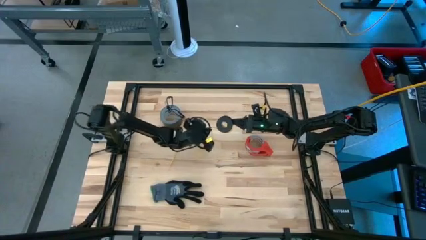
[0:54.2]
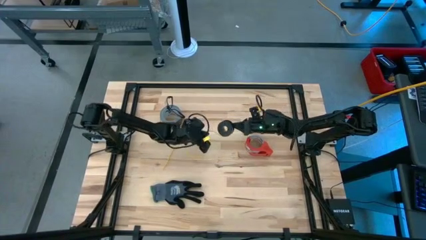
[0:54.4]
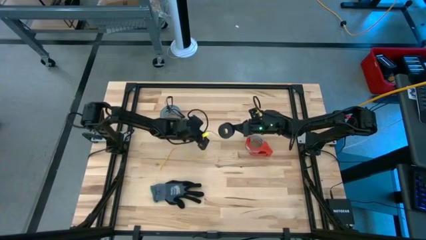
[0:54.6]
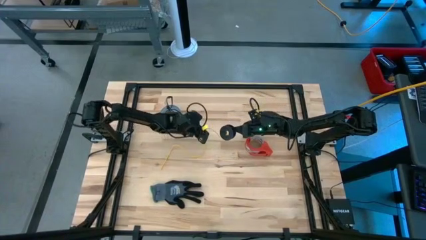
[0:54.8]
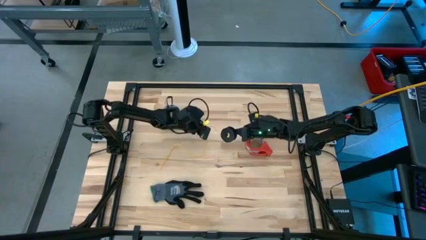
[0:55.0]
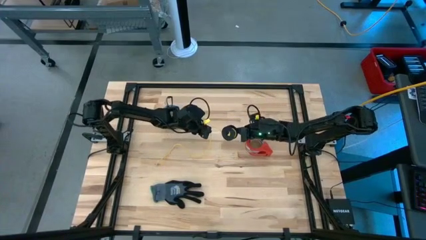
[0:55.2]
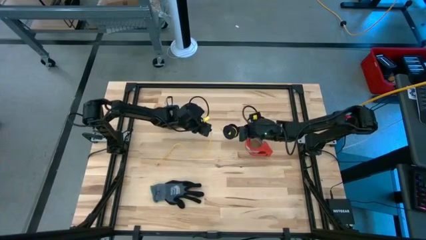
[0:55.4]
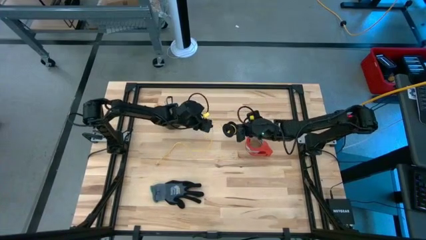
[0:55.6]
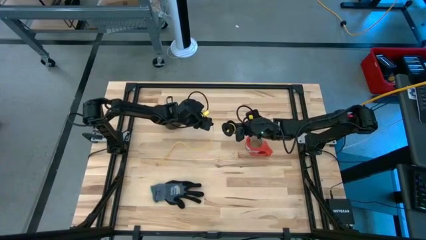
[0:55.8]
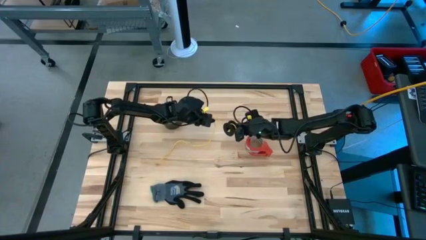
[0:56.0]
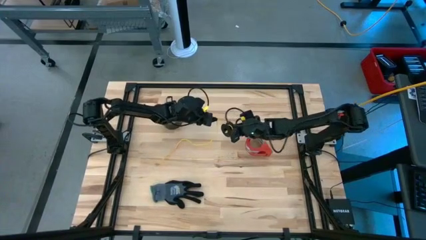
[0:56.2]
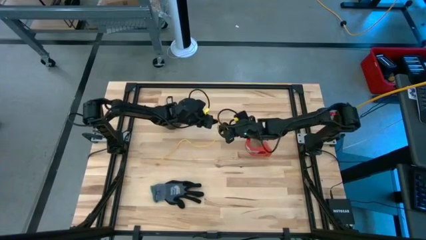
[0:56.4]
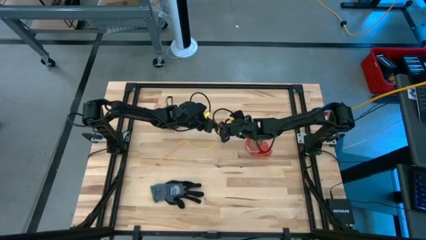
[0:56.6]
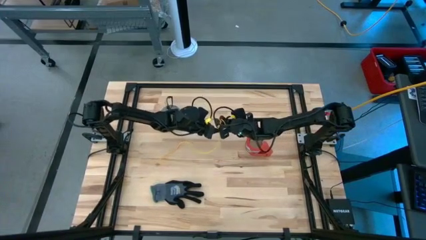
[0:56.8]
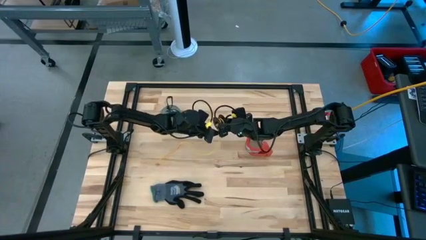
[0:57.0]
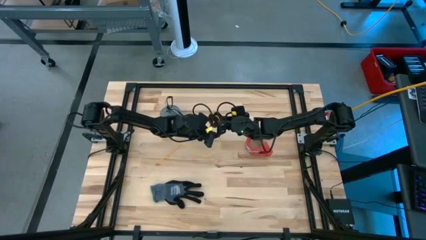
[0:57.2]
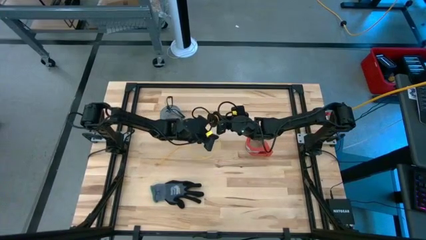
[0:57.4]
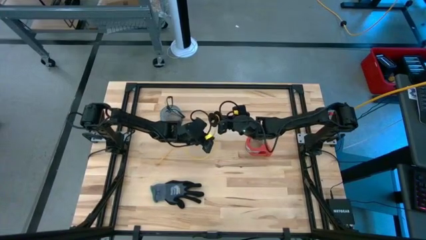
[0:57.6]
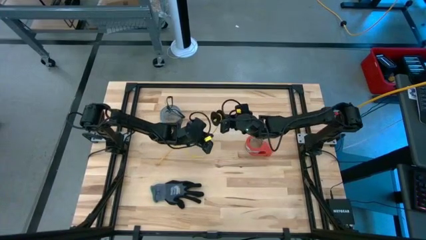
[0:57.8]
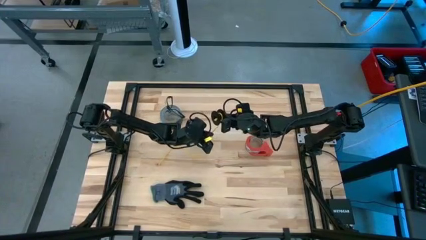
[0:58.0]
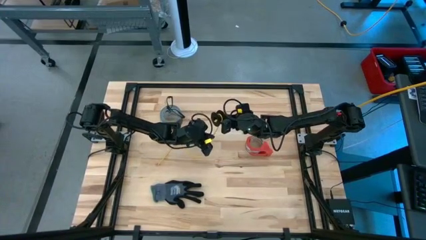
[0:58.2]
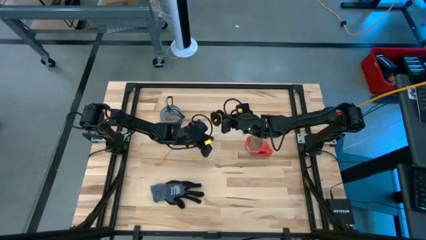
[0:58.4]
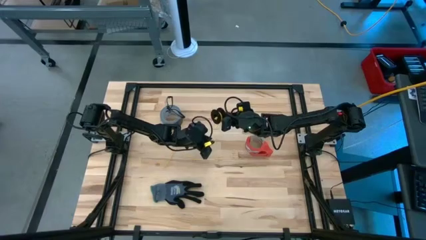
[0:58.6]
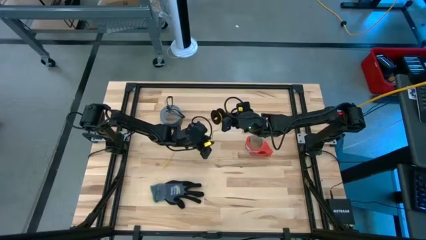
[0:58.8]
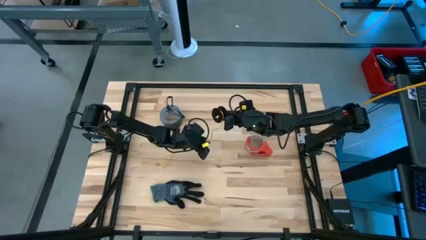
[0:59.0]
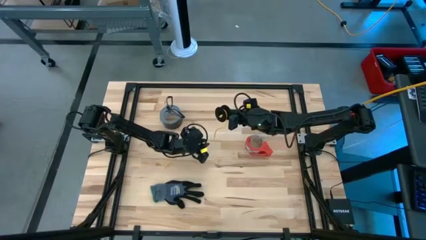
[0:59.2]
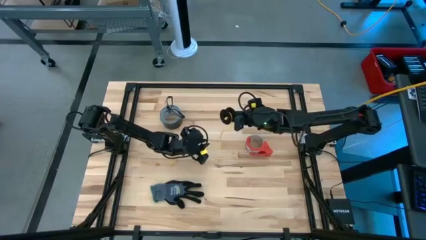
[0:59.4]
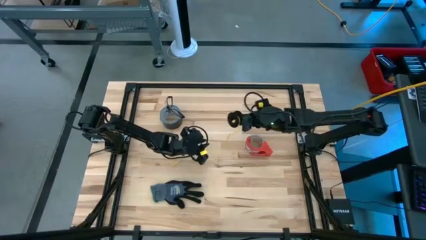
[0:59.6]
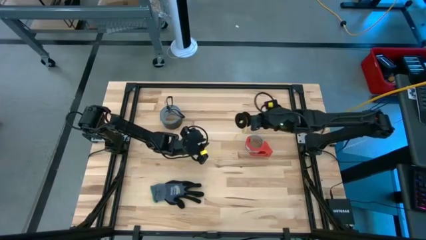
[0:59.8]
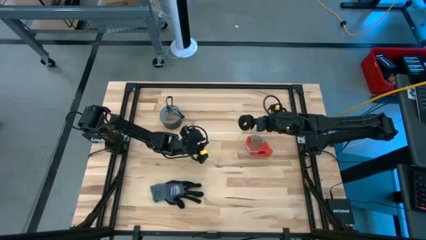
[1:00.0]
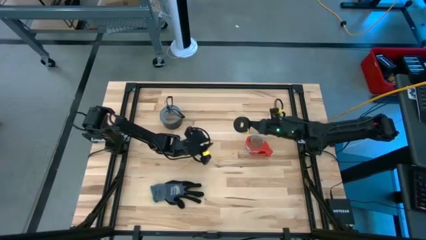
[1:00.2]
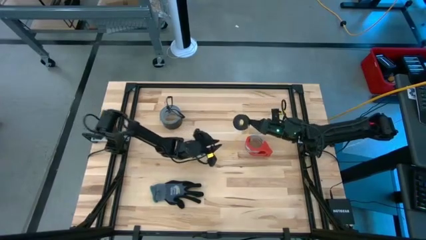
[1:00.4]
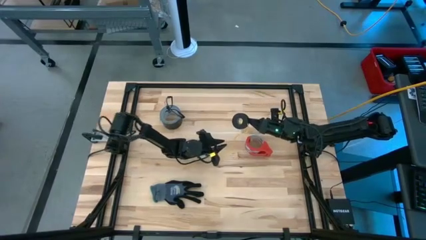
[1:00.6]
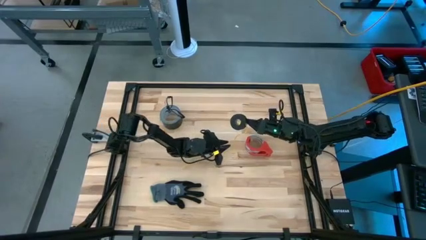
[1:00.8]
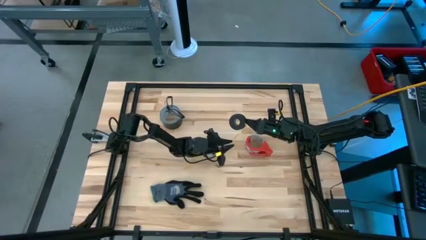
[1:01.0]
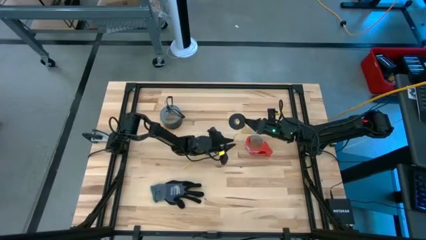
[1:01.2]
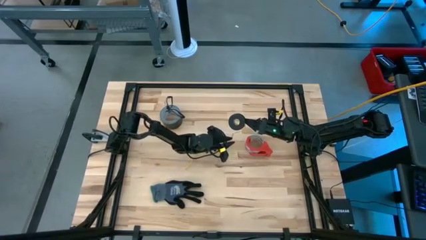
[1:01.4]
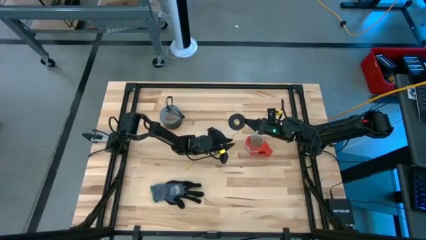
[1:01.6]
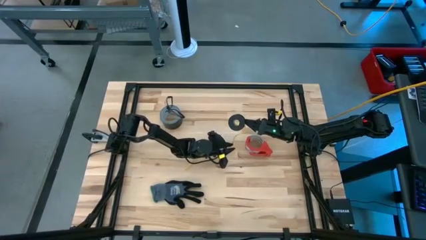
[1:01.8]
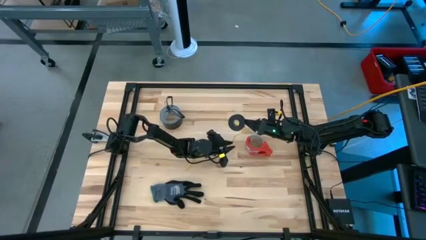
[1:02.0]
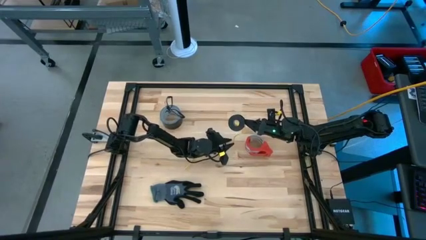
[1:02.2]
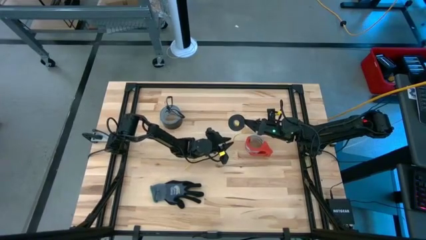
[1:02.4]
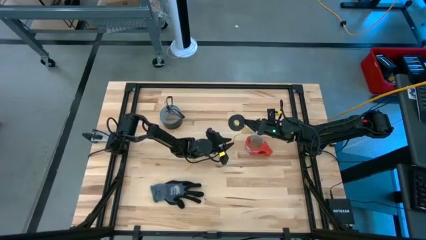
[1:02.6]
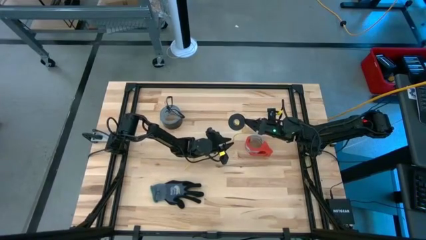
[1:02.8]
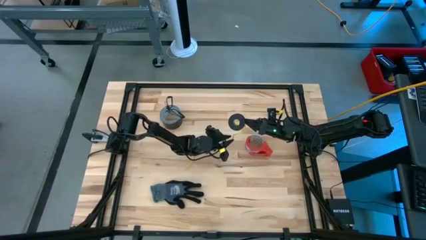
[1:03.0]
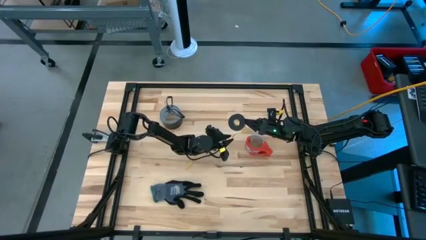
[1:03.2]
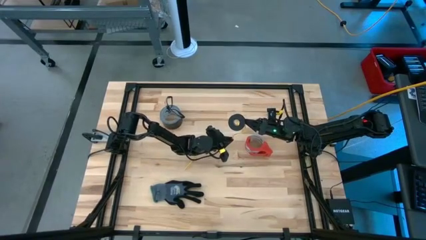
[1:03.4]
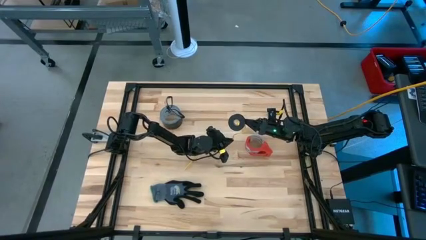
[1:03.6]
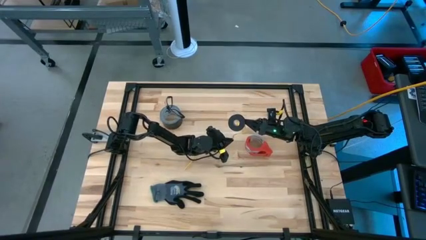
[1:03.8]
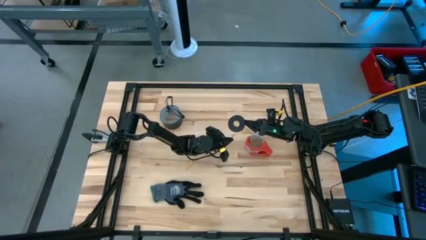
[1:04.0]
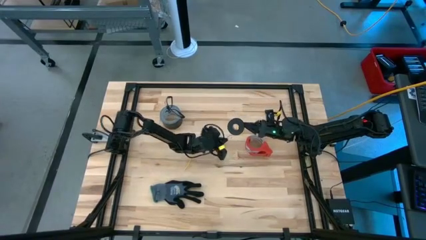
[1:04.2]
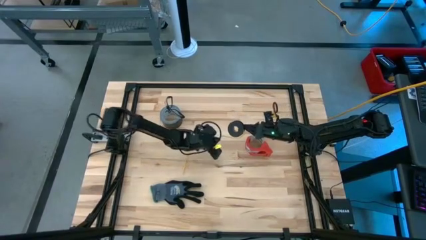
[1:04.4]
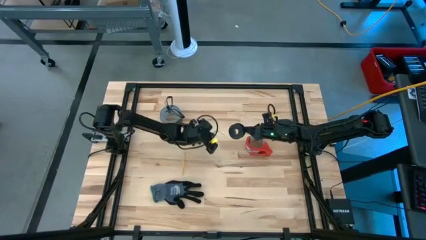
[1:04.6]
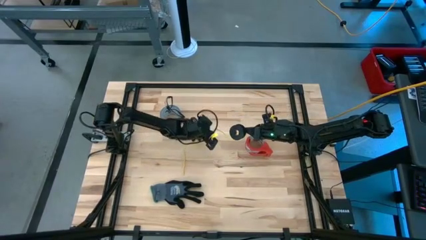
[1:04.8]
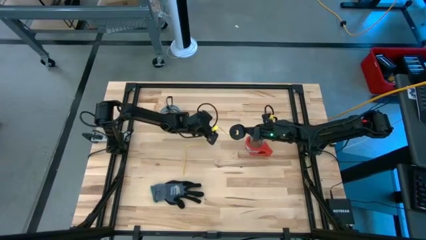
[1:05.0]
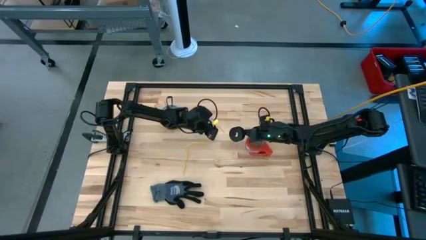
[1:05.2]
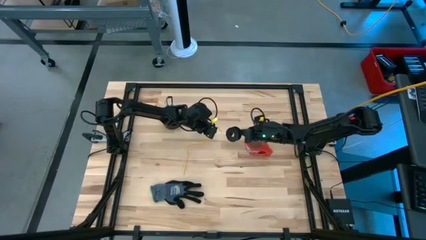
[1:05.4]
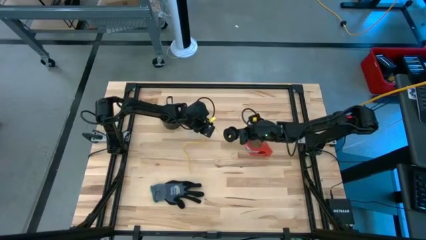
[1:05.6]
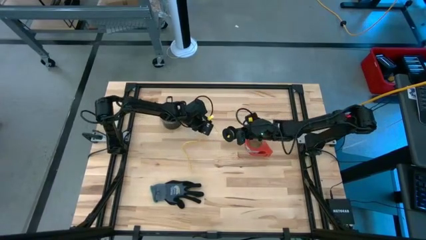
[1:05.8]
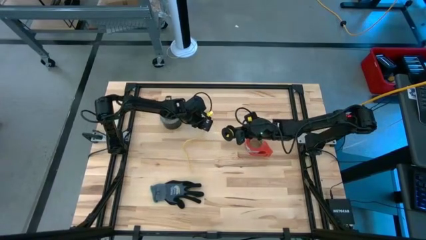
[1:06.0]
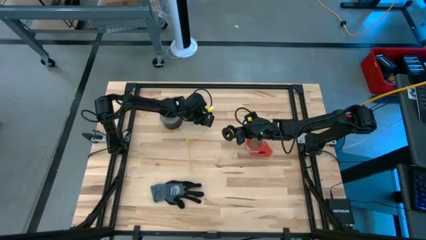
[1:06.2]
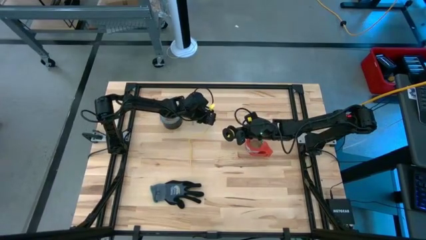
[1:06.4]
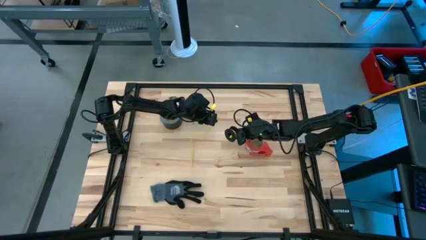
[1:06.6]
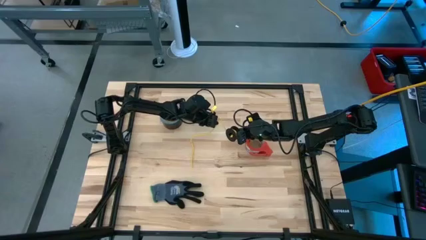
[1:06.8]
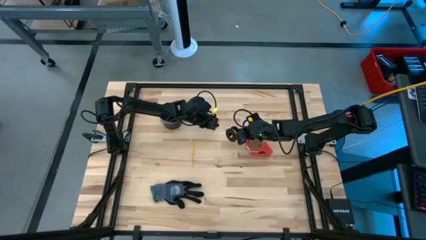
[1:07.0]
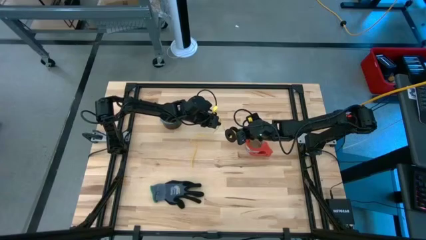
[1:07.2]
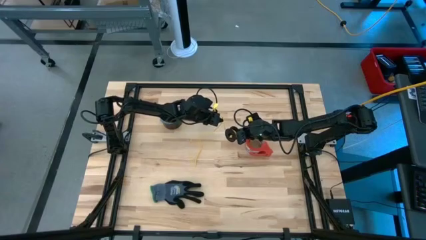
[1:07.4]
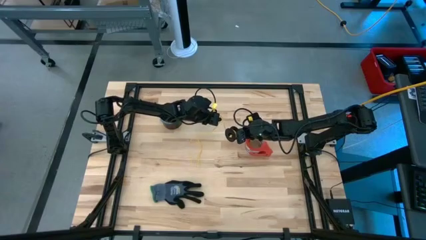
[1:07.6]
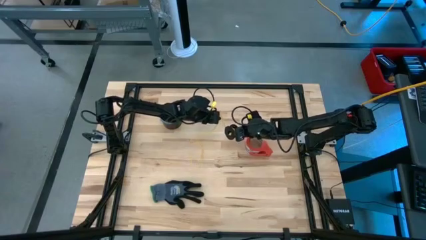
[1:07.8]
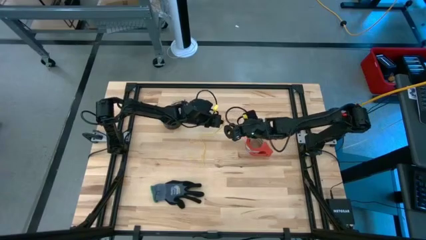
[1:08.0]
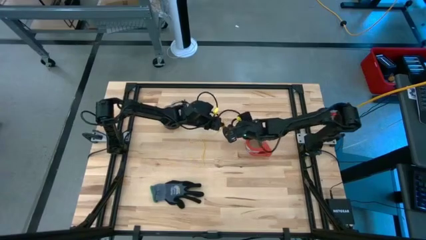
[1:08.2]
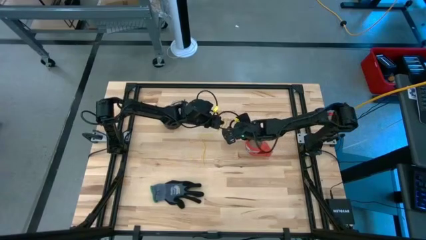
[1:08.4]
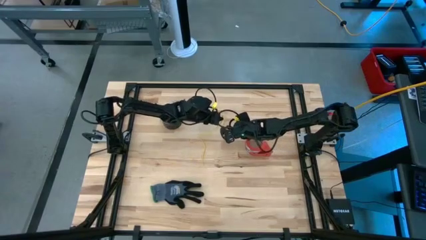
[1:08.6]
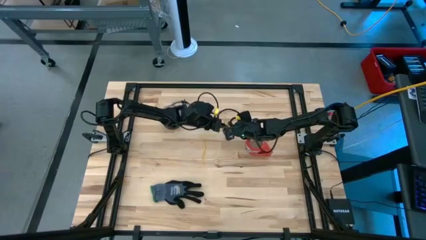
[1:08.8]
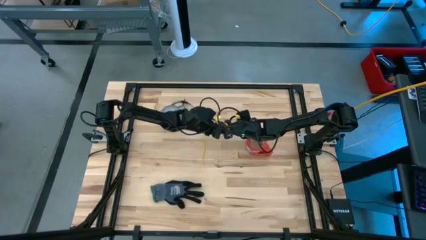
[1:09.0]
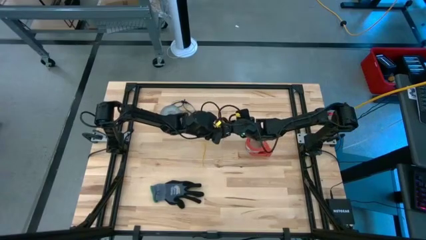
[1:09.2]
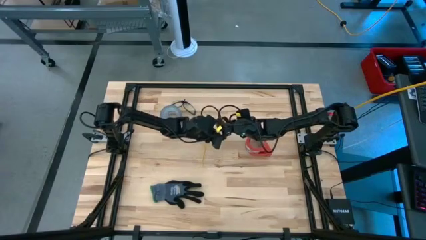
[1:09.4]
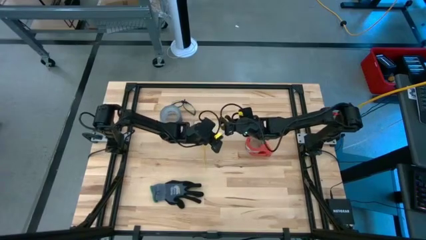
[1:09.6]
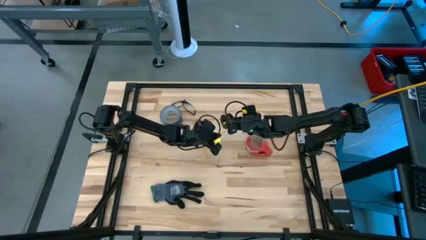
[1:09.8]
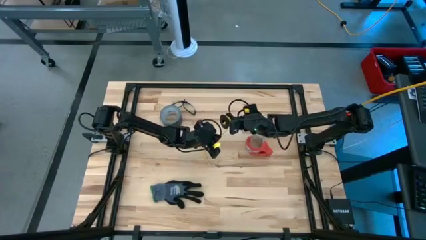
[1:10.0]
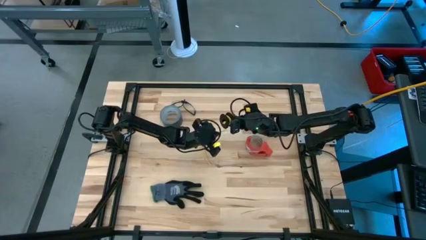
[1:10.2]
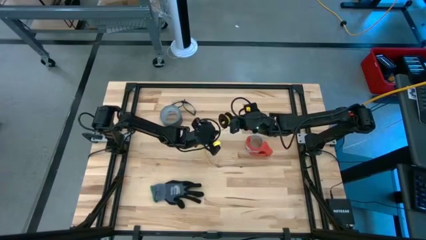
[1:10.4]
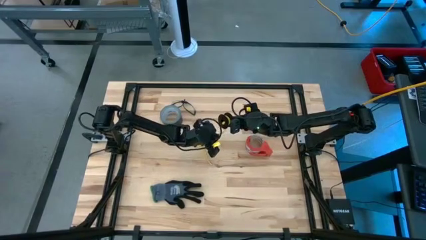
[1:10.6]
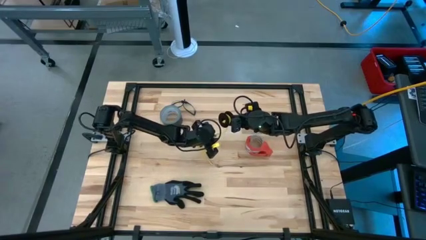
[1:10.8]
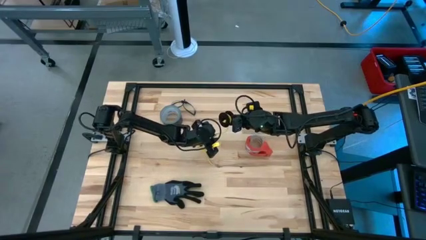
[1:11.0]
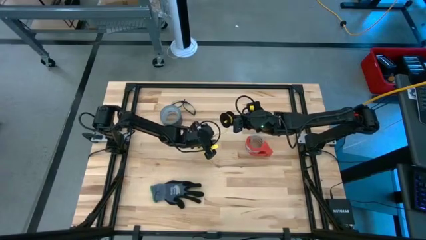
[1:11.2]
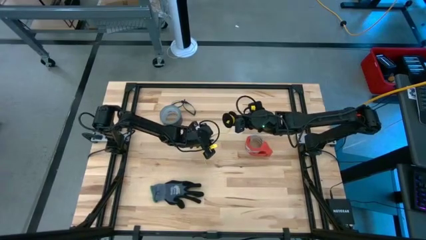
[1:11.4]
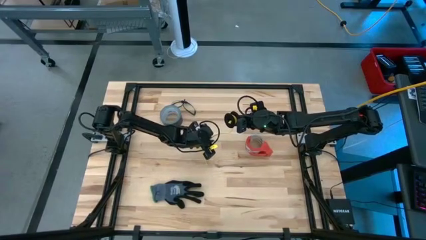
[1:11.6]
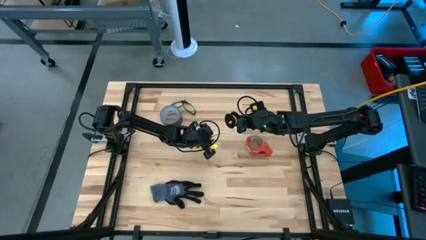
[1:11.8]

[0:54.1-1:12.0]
Task: Coil cords
Coil the yellow wire onto the spool
